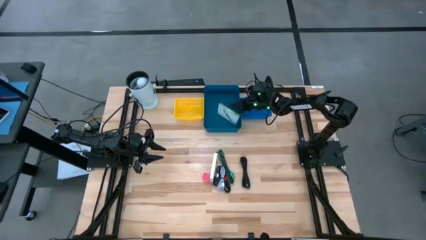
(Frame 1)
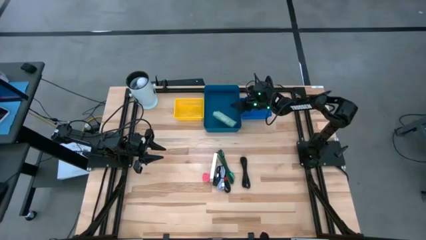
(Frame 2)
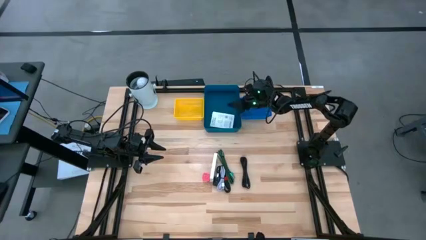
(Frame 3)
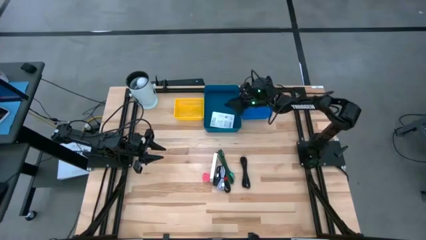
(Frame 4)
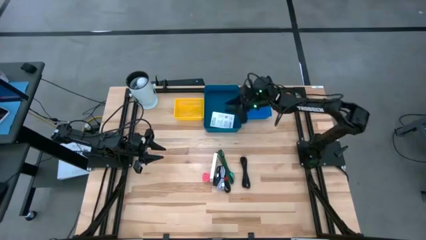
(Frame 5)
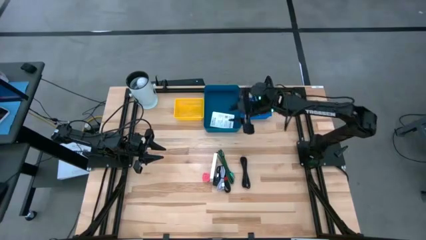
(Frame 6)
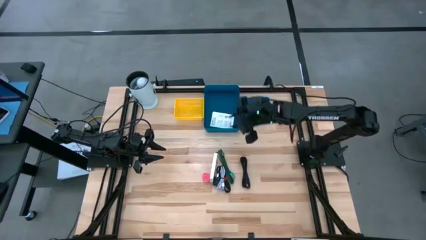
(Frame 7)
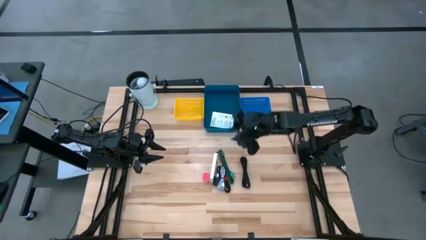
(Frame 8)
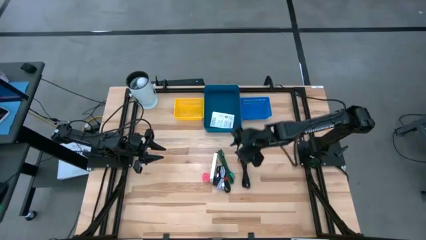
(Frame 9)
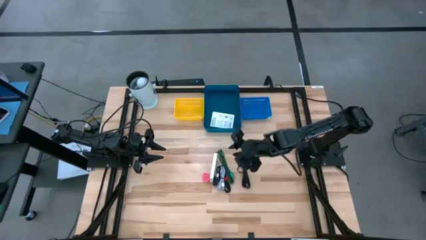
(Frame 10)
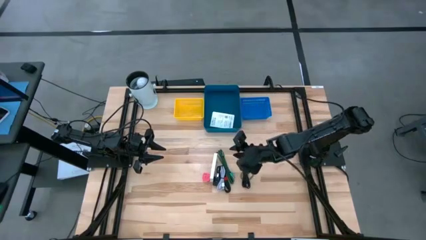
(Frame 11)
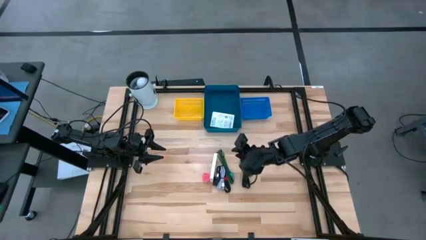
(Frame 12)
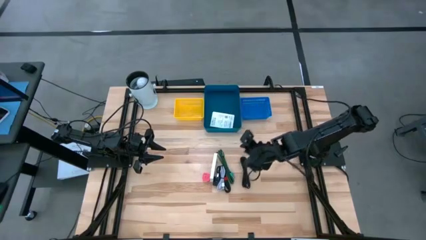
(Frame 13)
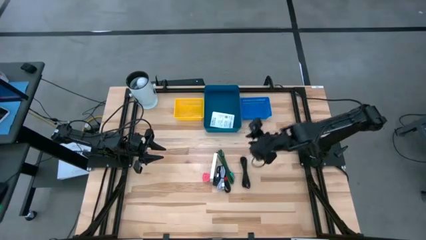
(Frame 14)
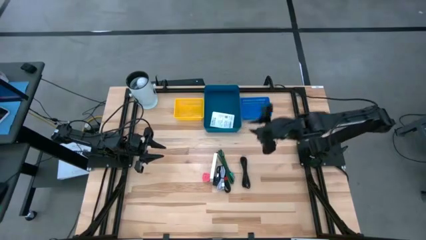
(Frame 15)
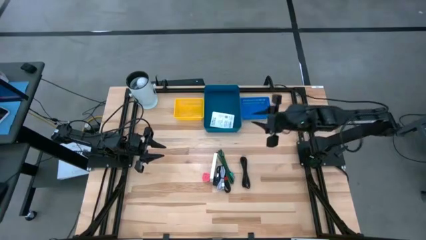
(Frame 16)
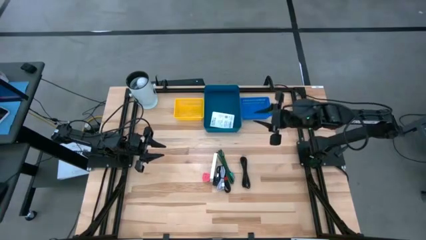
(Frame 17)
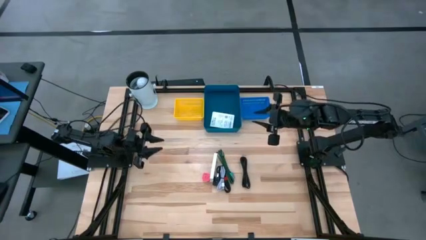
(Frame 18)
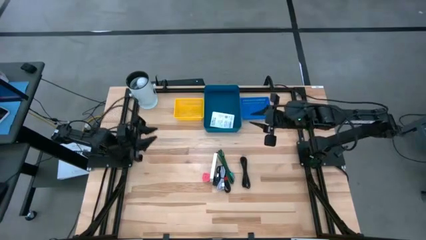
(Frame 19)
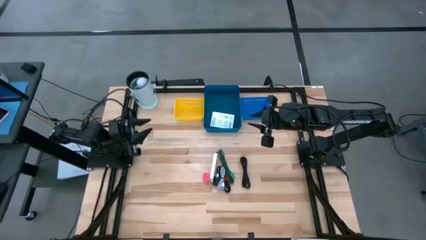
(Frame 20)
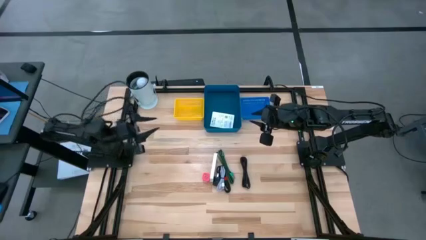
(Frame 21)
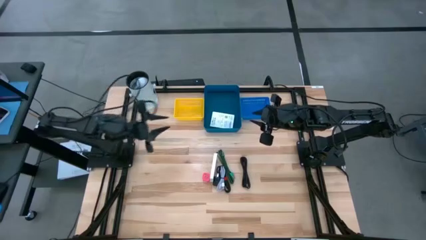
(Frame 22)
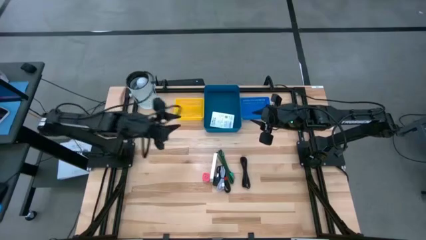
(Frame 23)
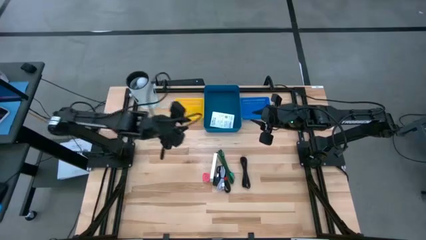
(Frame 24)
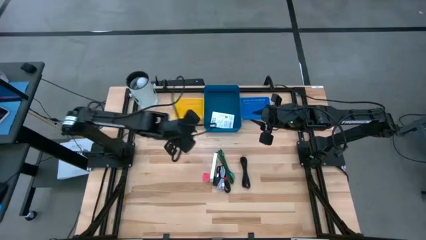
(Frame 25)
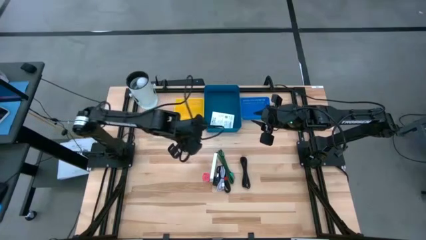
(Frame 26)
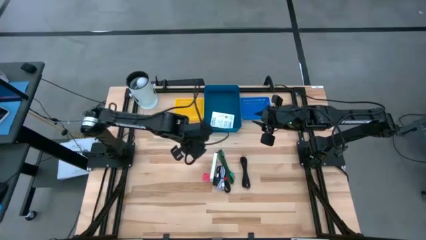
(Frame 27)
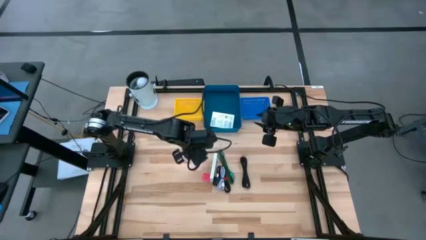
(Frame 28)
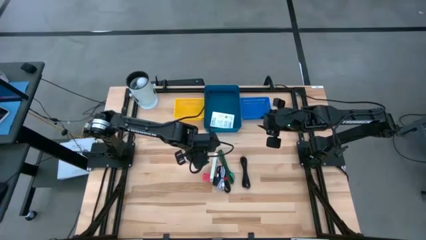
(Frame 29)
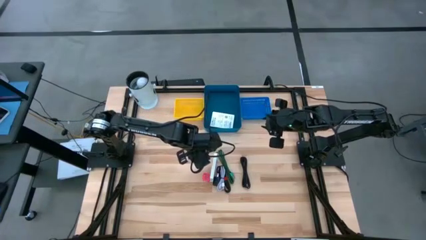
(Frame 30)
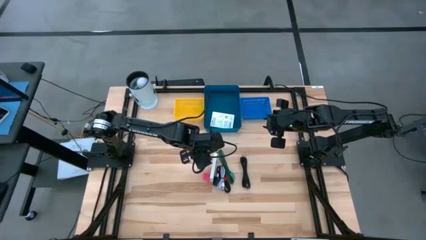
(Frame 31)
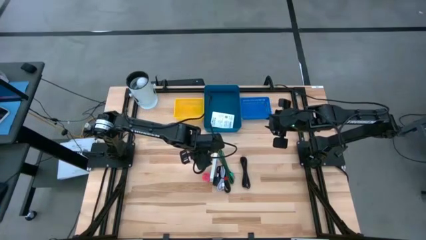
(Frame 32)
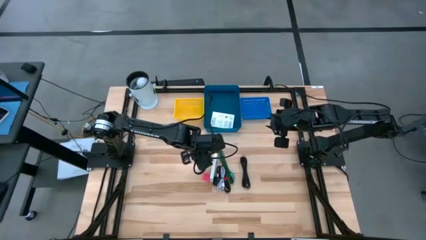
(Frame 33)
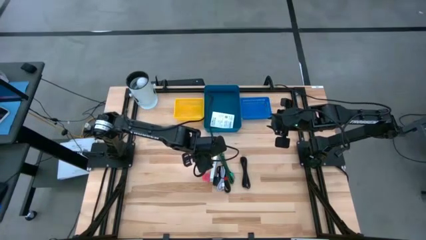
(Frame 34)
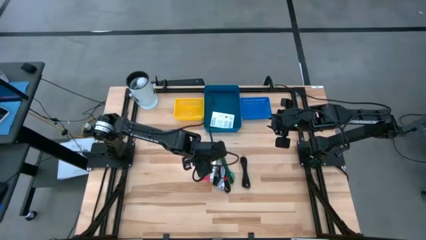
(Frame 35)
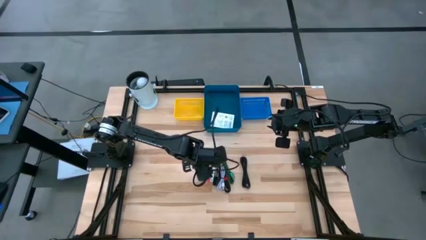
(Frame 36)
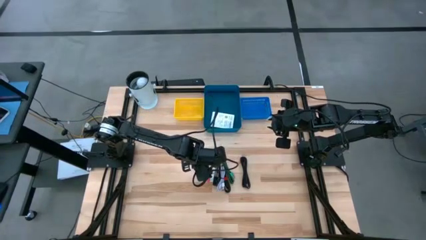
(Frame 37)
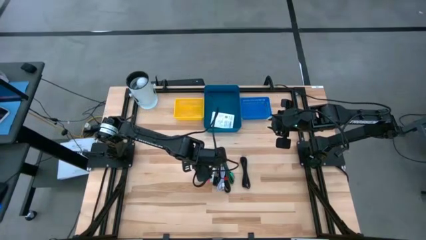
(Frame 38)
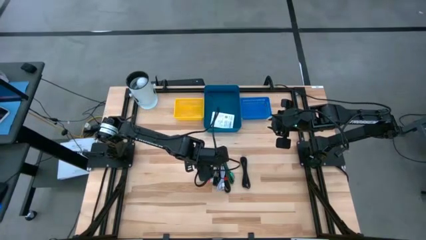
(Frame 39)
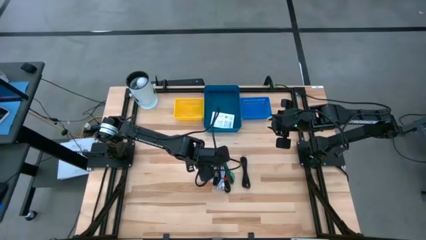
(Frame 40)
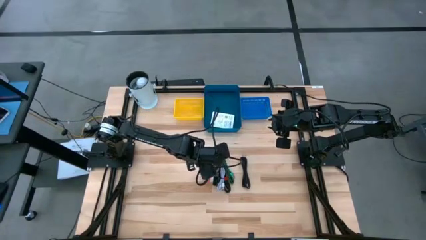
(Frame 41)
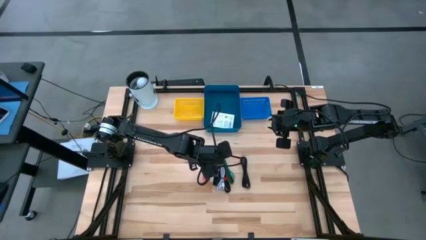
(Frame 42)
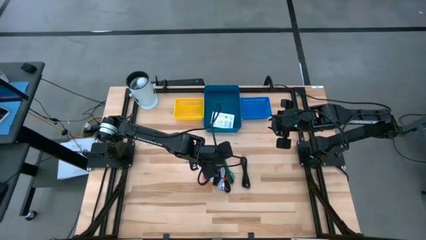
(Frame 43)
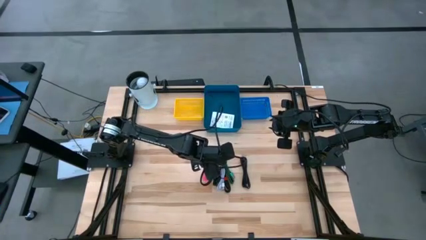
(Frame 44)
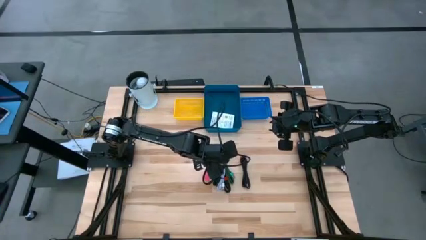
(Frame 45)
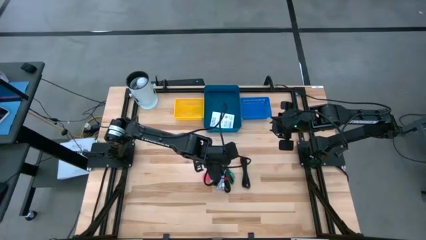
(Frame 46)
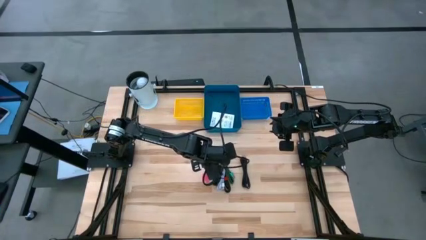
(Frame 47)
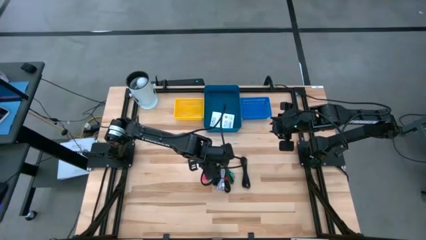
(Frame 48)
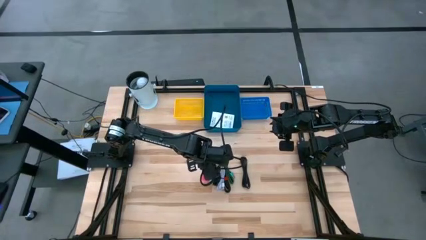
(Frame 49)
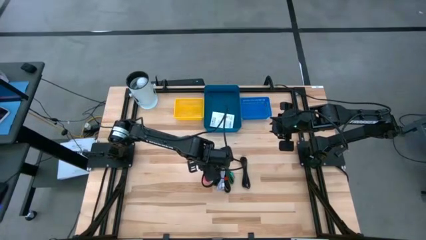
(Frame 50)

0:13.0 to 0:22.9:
Task: Pick and place items into bin
Put the white card reader box into the large blue bin

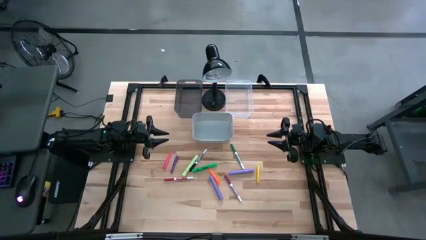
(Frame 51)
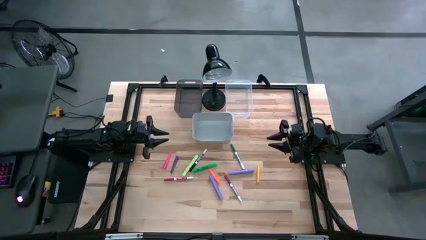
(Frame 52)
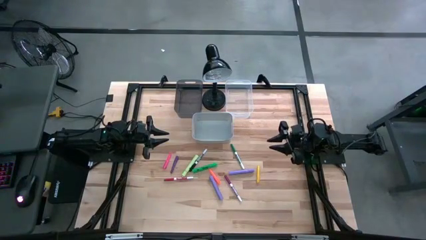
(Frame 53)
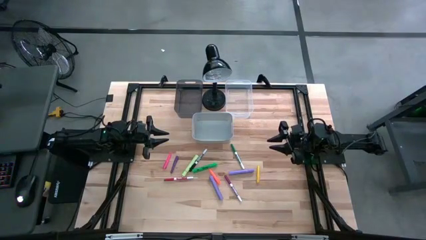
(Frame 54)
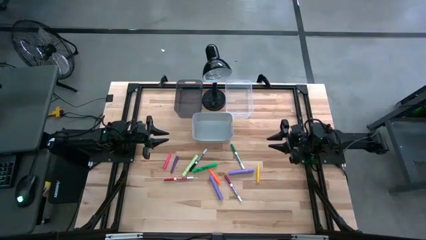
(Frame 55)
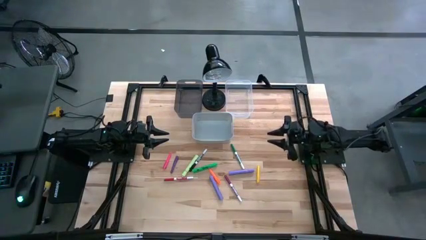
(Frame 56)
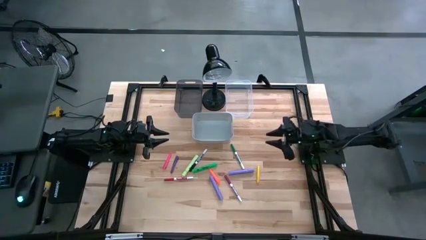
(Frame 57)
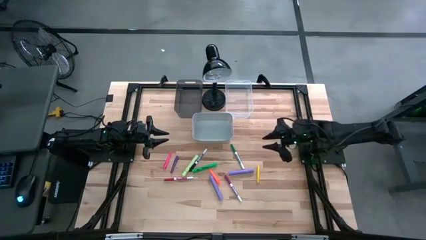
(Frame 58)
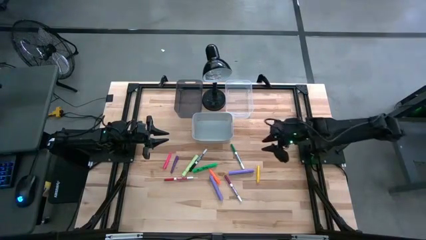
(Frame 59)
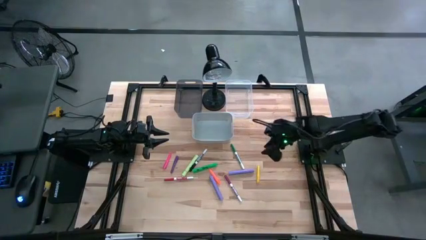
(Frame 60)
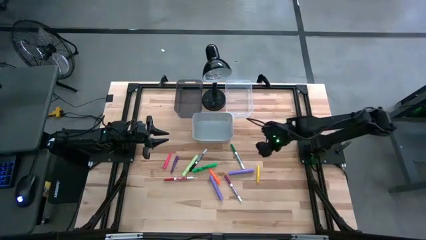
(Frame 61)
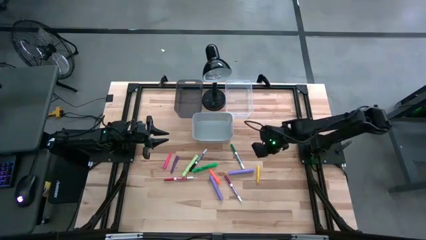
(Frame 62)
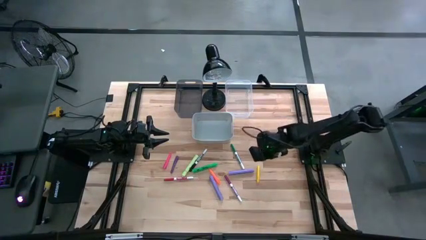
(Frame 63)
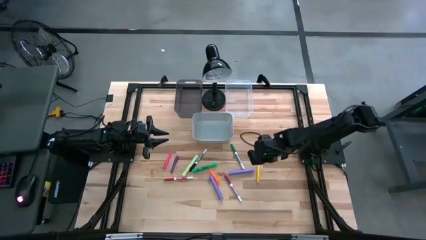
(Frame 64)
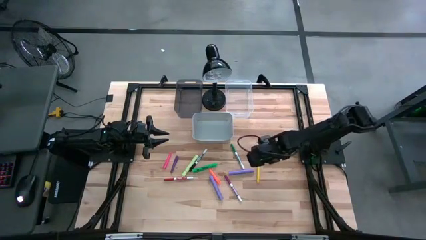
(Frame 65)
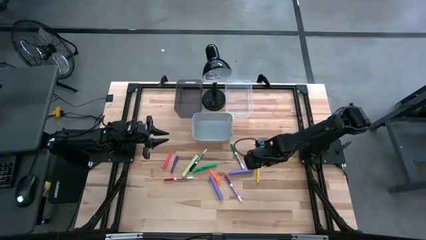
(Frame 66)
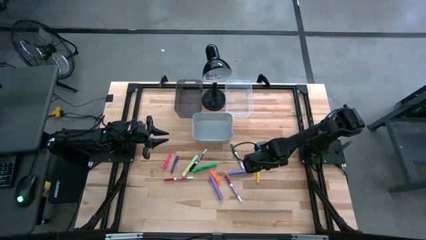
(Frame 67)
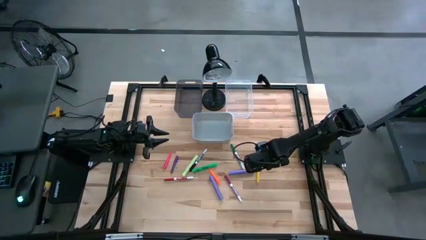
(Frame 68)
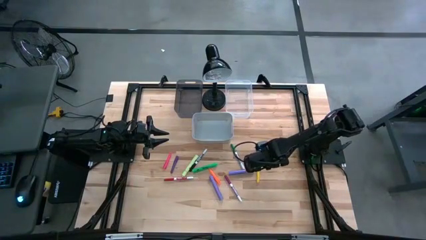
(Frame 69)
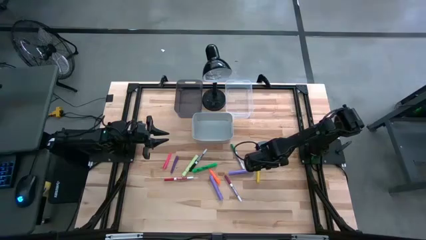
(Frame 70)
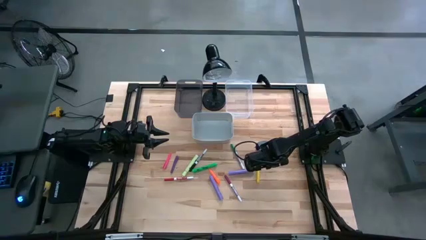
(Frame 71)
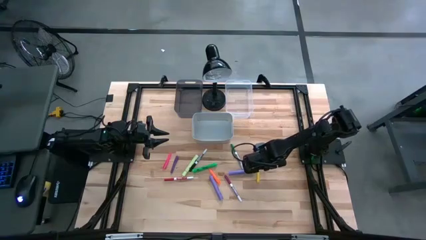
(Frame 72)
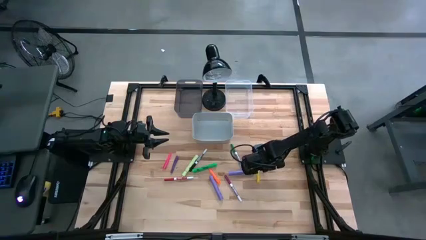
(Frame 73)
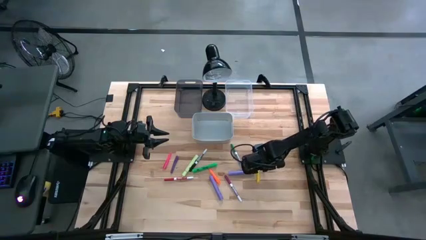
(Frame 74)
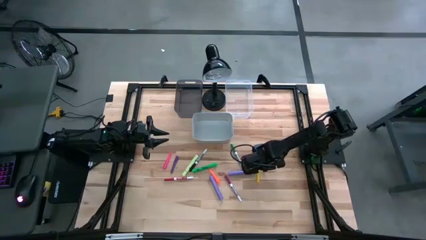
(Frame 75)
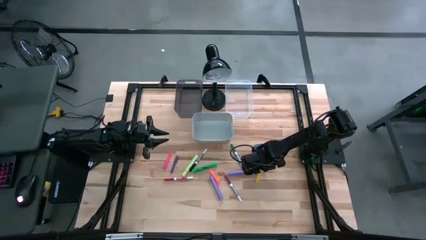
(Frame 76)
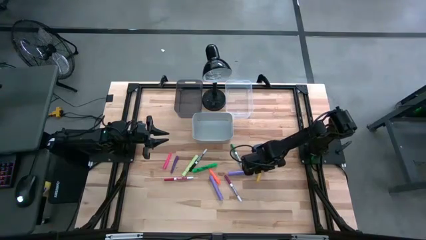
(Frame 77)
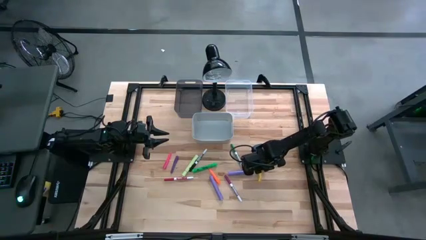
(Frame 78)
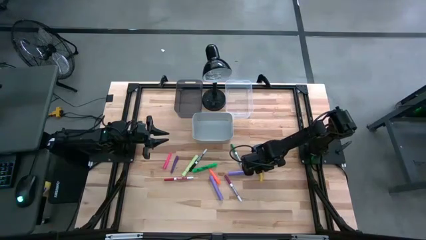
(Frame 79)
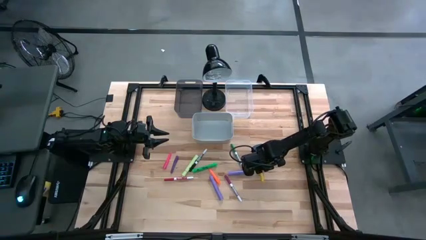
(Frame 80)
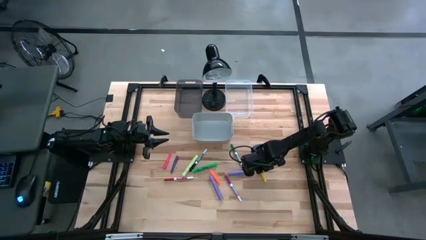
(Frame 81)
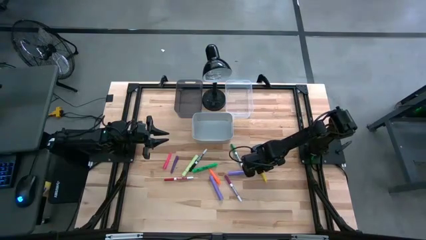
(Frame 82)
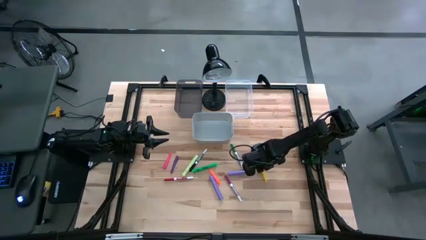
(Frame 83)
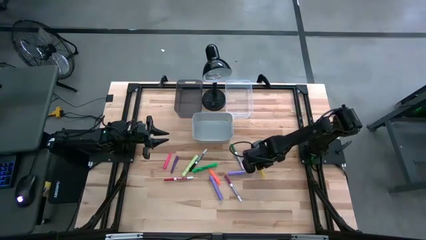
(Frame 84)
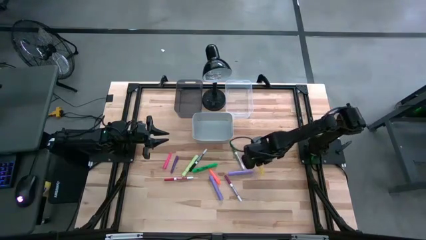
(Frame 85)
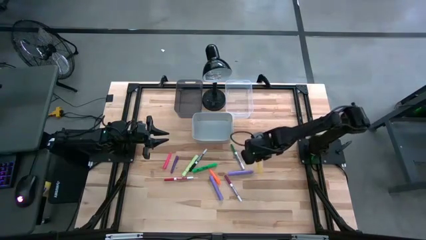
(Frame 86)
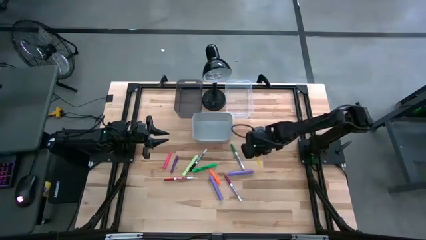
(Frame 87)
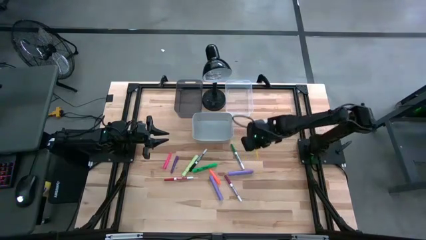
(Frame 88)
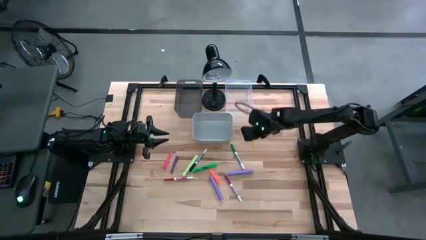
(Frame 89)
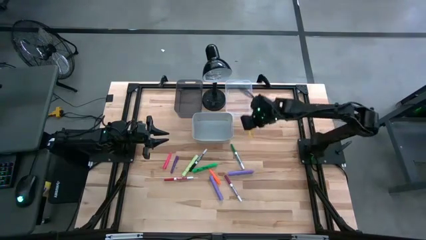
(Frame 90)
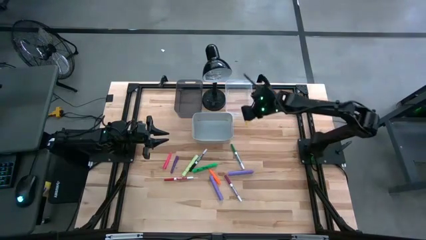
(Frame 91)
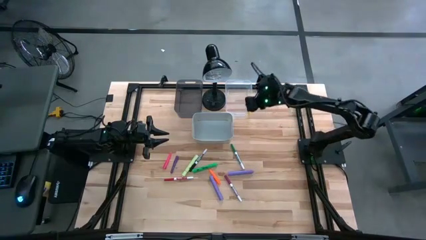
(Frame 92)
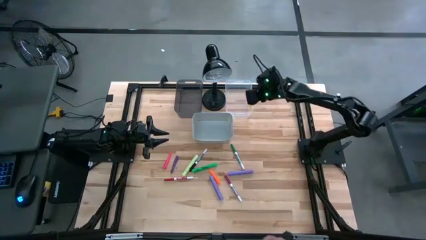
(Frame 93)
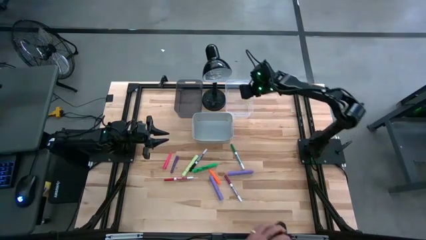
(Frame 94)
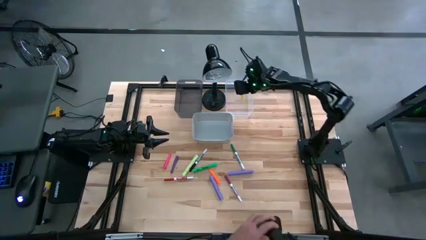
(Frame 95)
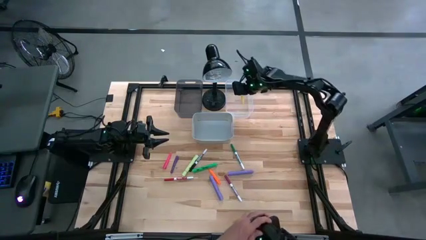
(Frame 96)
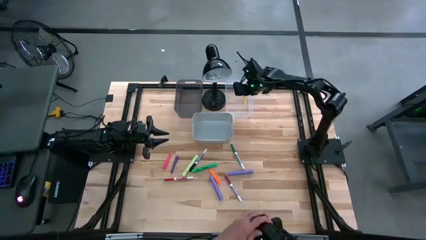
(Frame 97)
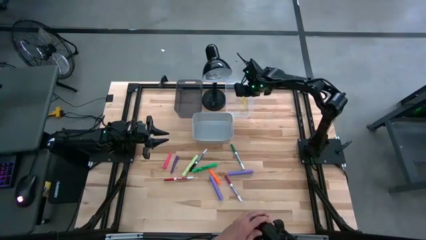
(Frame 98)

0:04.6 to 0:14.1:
Task: Pick & Place Markers
Put the small yellow marker into the transparent bin
